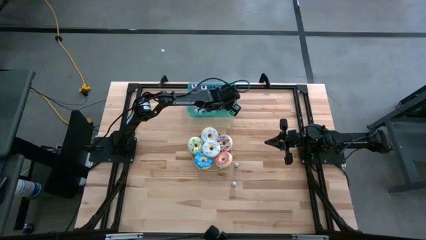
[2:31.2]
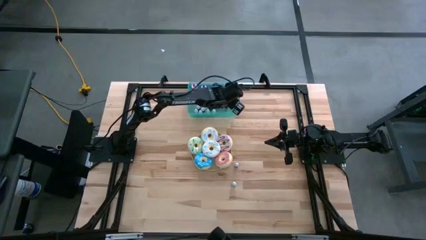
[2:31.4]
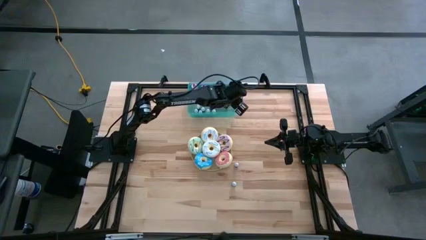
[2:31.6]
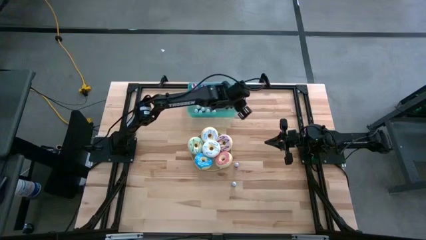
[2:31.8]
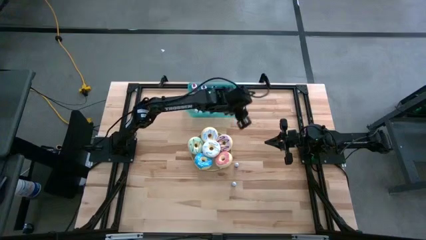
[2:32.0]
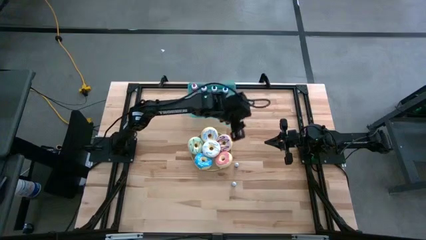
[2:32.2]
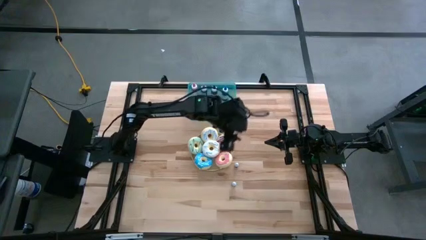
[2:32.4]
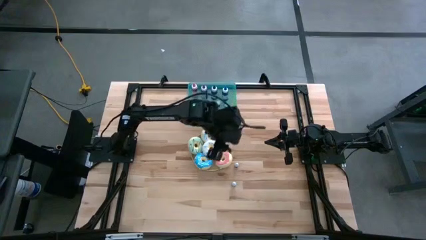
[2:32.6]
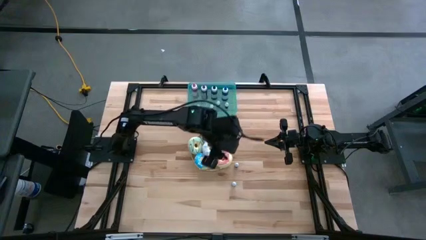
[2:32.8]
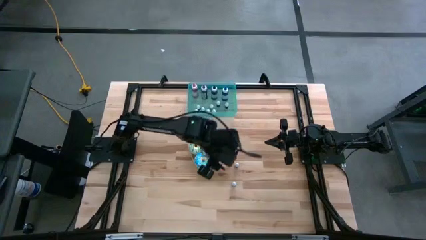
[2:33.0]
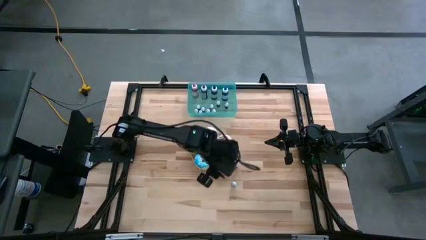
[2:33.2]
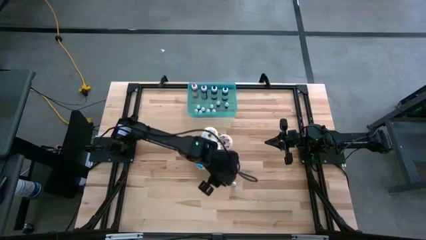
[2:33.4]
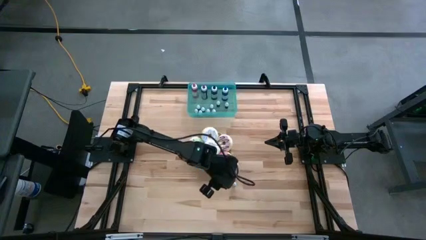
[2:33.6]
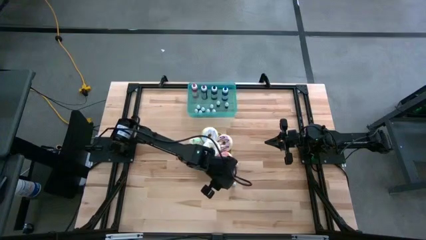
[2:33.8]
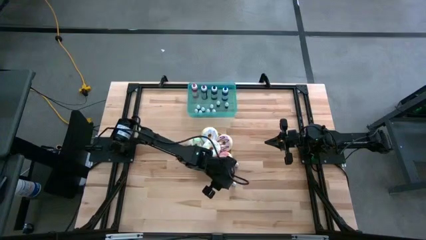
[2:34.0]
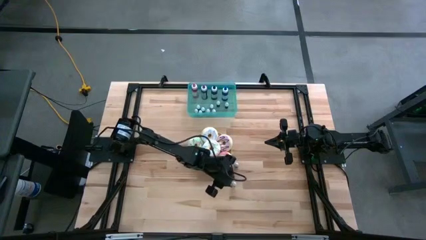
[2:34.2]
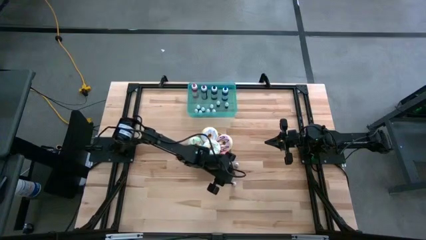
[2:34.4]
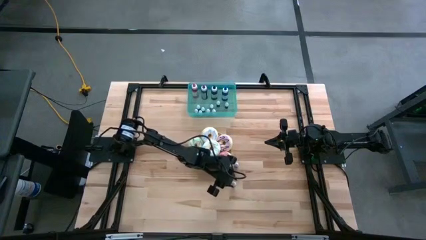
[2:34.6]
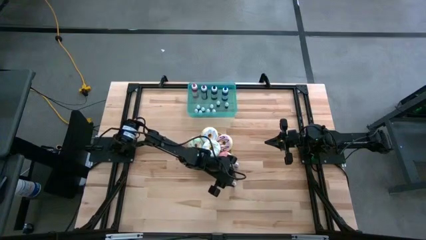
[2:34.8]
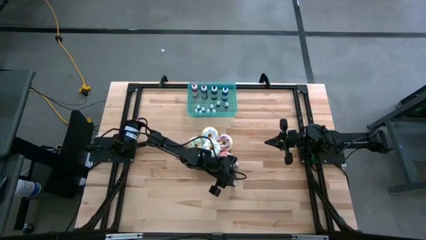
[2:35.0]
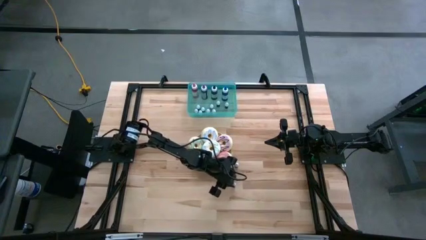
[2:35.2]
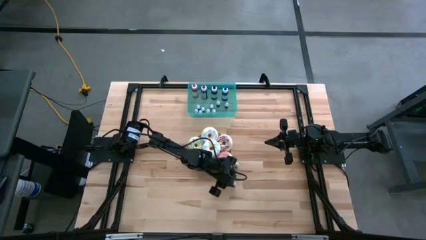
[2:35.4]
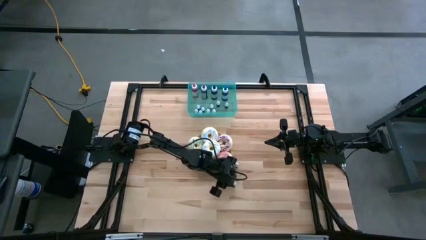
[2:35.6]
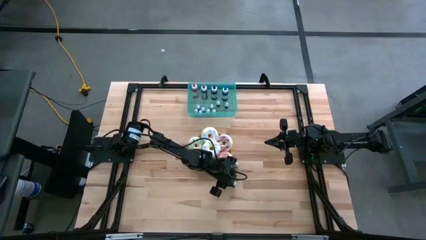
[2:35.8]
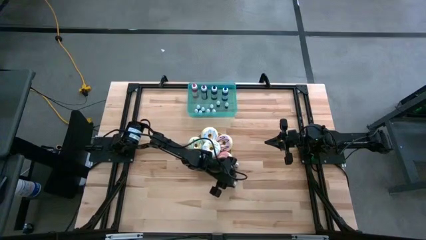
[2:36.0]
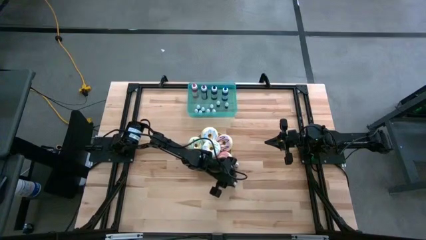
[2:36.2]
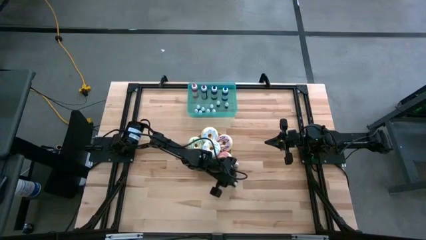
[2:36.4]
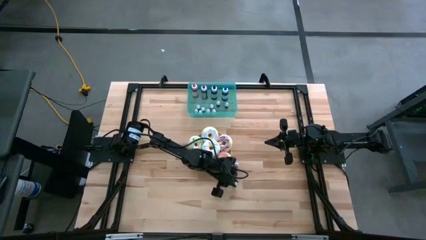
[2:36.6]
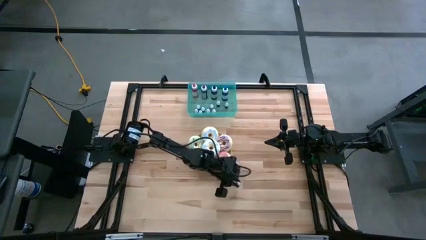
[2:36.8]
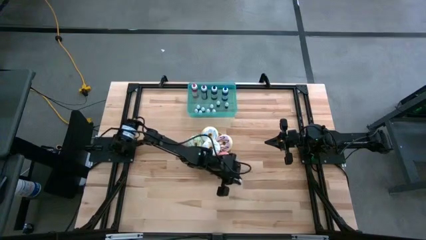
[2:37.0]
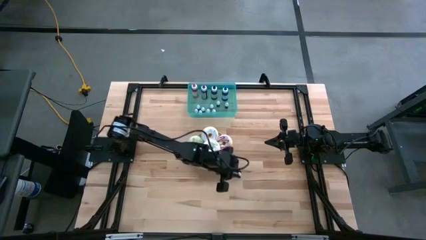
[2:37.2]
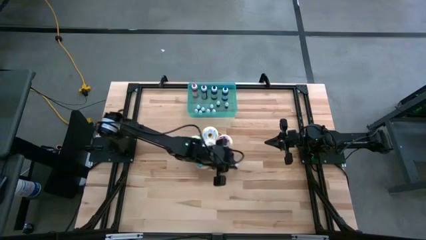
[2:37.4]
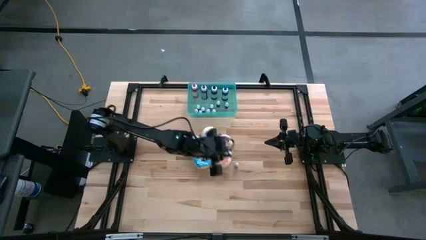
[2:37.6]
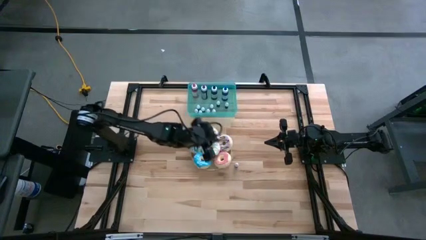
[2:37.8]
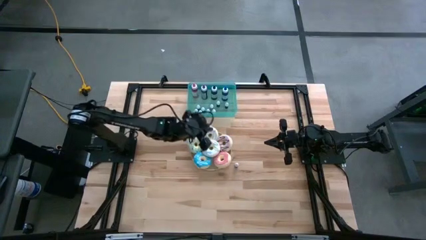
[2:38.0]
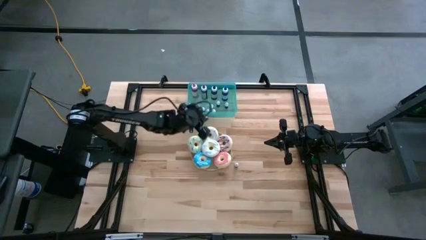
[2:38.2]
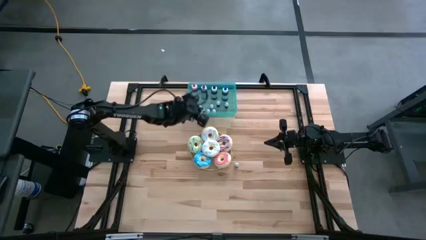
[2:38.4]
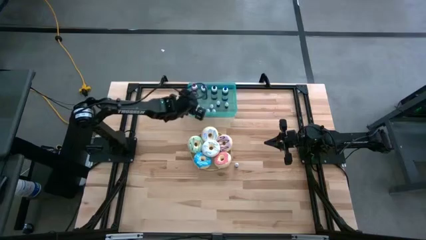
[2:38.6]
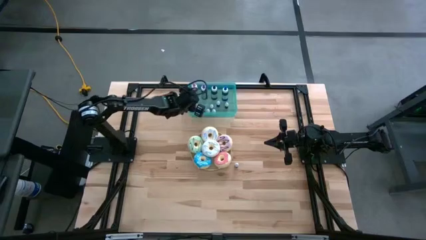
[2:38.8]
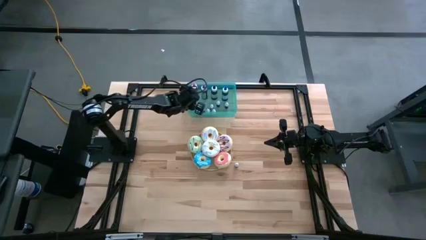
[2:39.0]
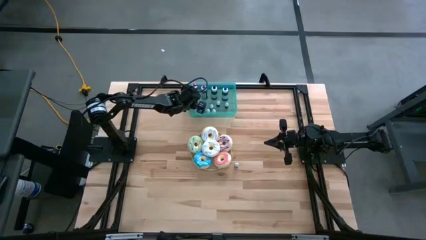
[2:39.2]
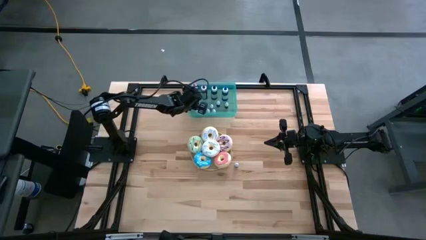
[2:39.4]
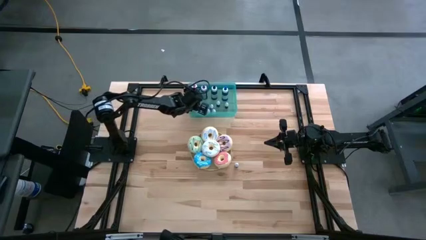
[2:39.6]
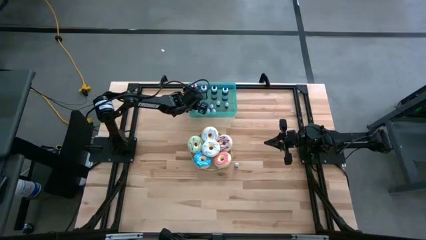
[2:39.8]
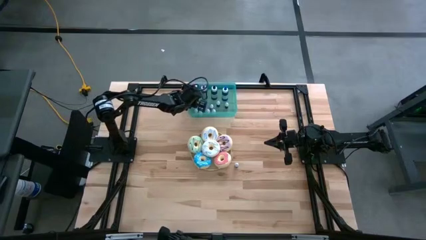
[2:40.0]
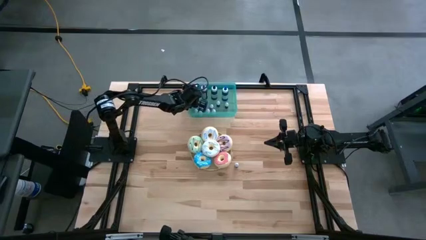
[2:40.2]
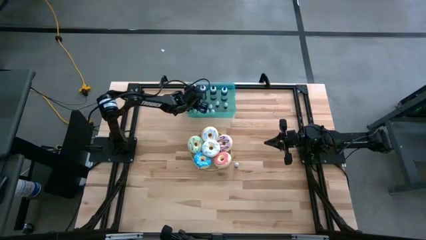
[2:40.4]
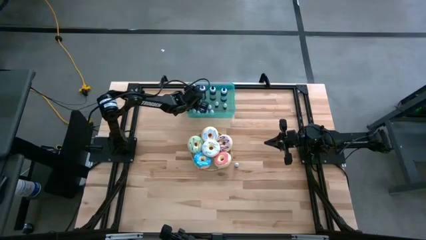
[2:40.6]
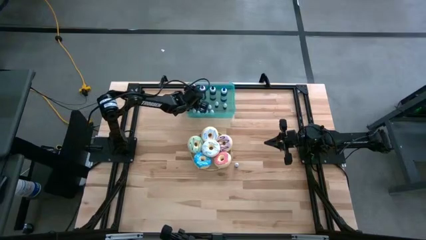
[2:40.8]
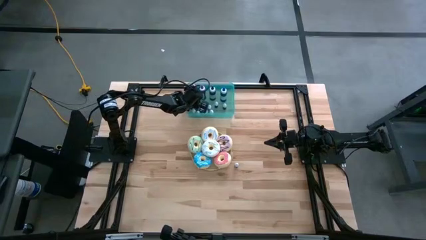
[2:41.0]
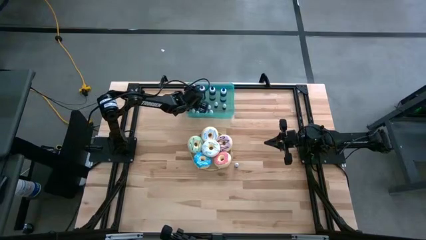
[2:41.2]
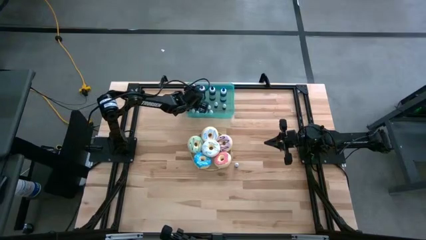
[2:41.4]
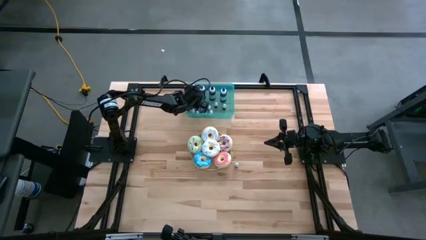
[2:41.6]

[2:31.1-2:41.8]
Task: Pick & Place food coloring
Put the small black food coloring bottle into the green container

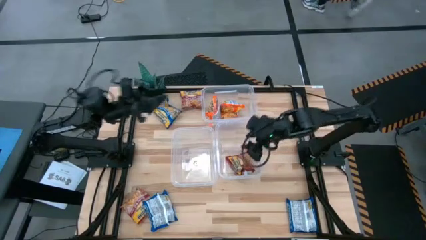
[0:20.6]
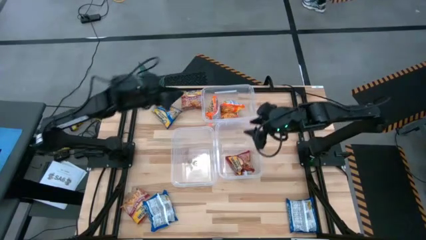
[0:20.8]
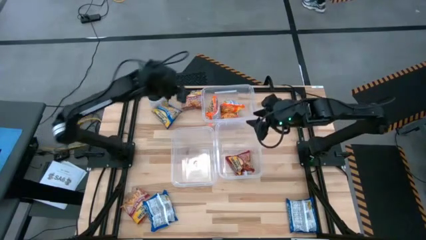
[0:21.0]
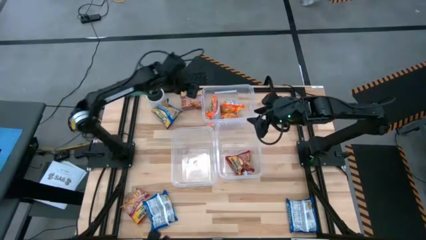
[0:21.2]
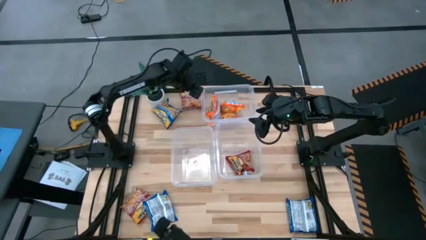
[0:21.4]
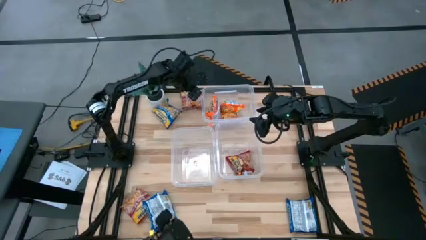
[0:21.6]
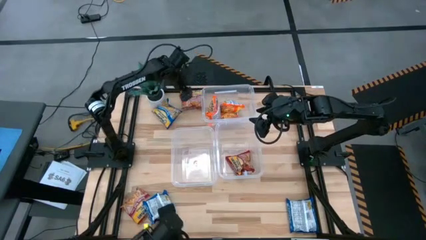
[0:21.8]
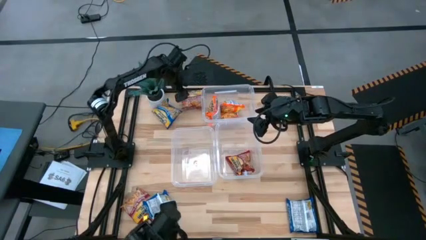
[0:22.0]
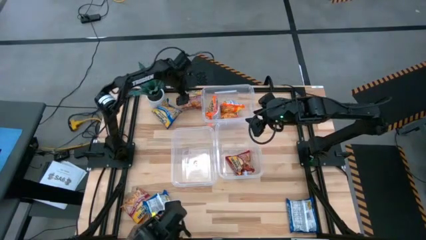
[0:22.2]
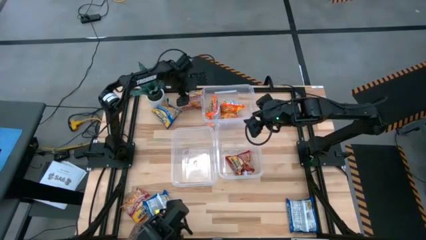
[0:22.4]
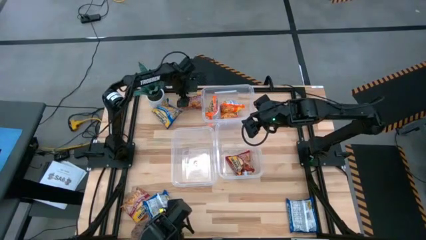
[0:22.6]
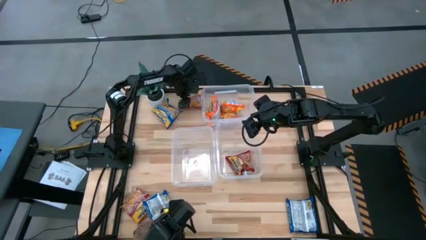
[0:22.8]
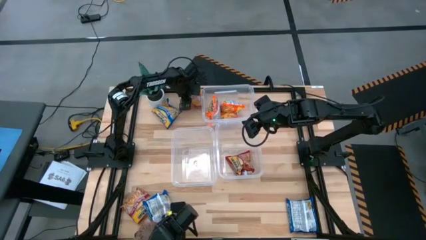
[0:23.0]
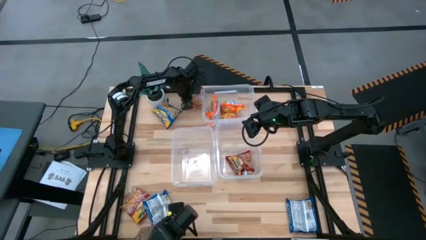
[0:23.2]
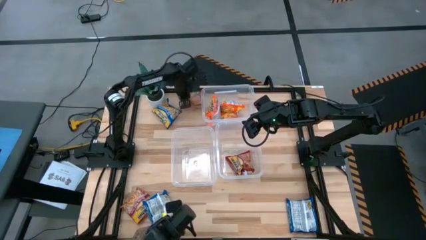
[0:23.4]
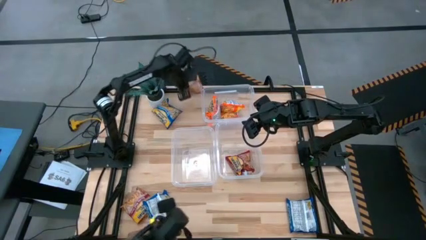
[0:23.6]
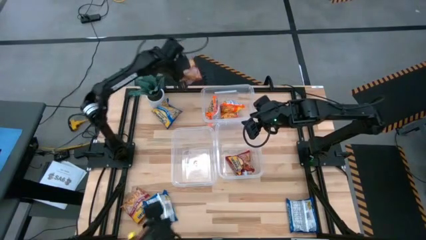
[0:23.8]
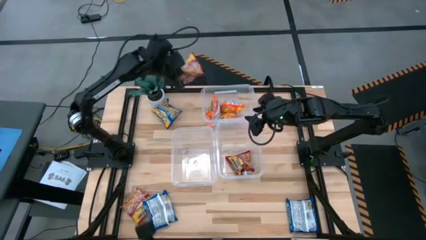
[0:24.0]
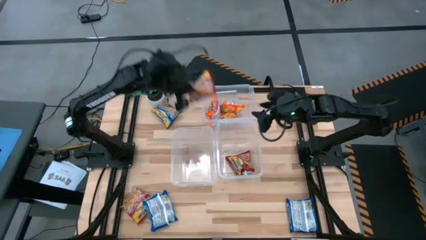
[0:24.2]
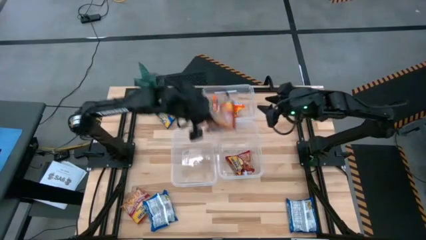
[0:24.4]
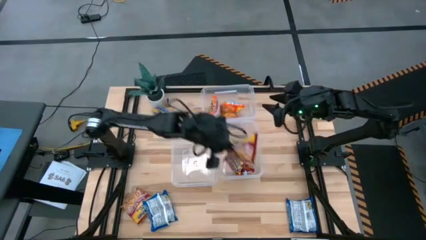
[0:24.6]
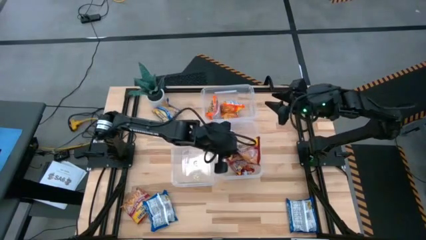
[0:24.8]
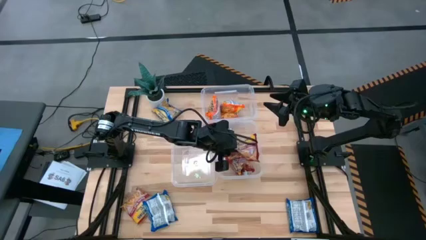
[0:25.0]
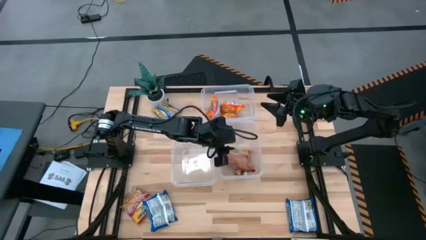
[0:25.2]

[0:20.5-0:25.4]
Task: Sort Maruchan noodles
Put the top red noodle pack into the bottom right transparent bin
